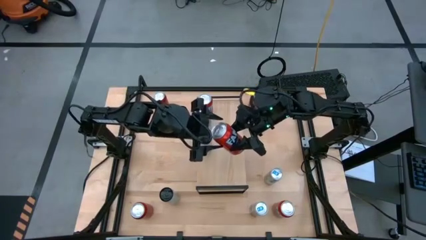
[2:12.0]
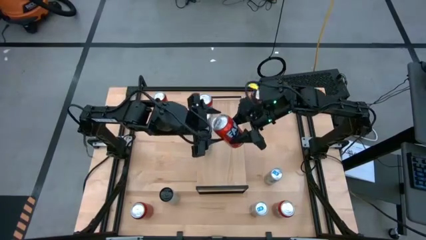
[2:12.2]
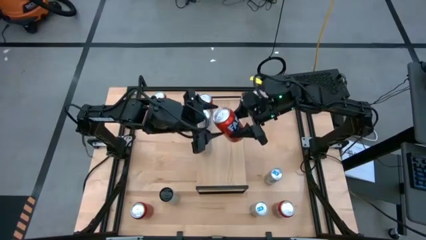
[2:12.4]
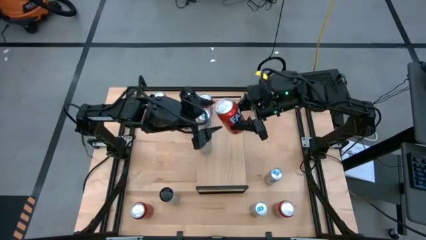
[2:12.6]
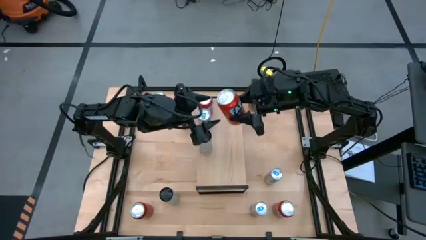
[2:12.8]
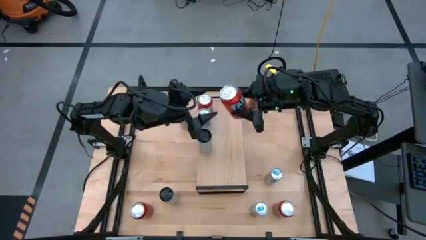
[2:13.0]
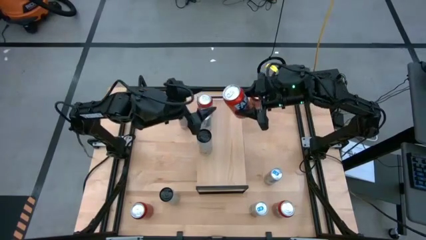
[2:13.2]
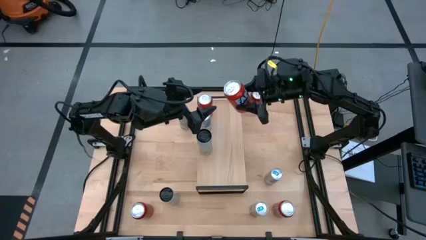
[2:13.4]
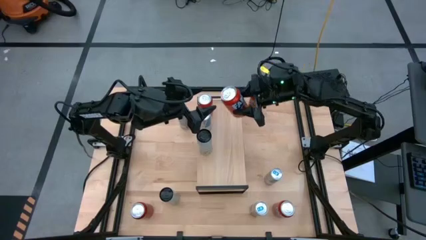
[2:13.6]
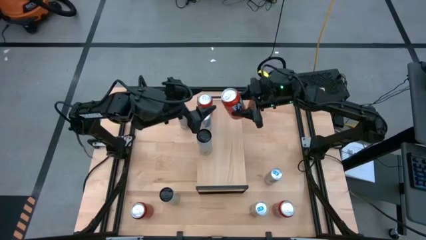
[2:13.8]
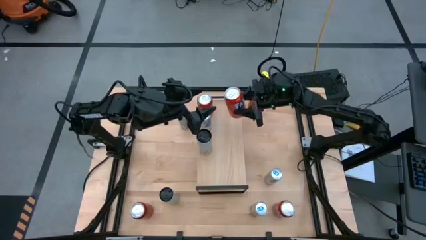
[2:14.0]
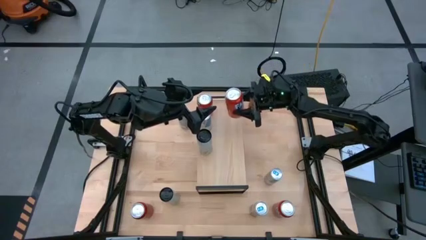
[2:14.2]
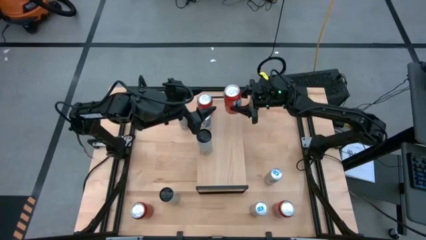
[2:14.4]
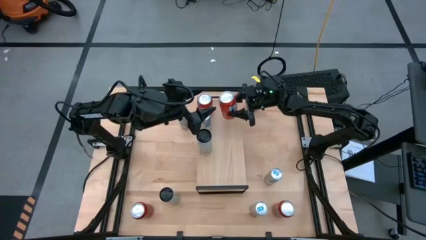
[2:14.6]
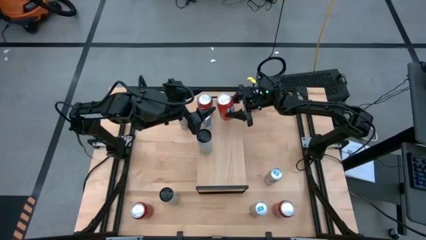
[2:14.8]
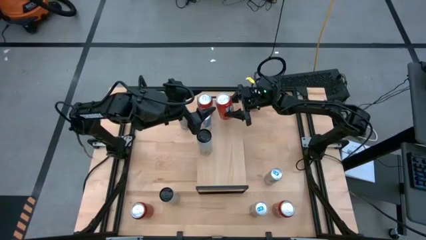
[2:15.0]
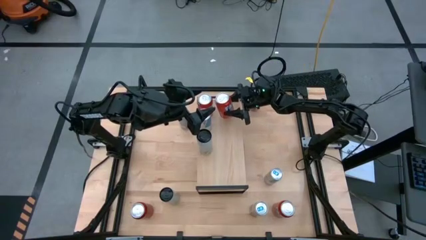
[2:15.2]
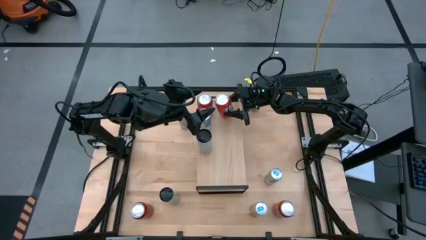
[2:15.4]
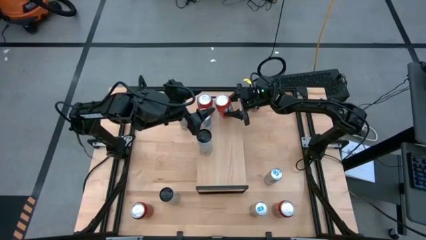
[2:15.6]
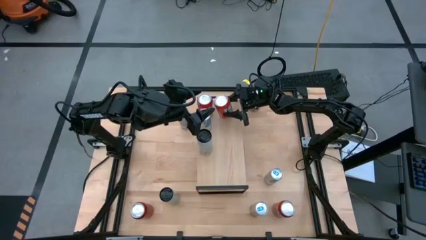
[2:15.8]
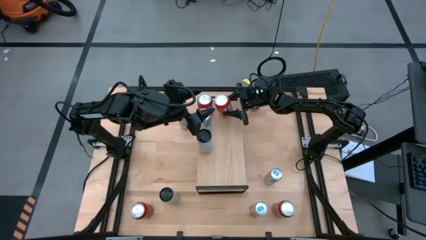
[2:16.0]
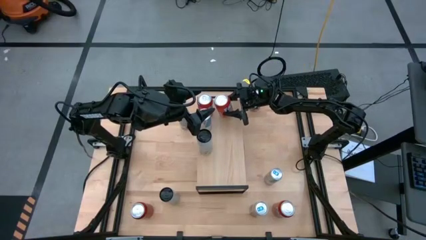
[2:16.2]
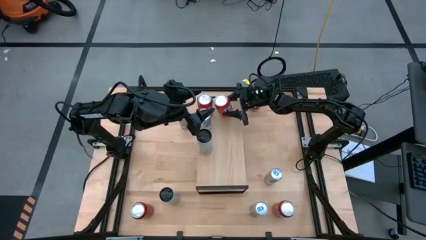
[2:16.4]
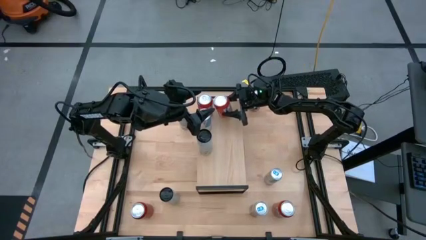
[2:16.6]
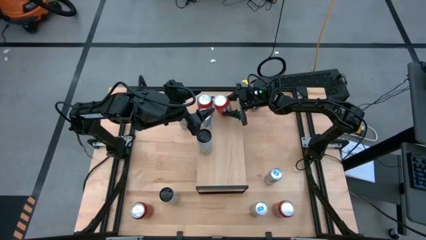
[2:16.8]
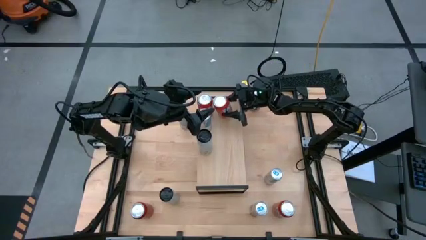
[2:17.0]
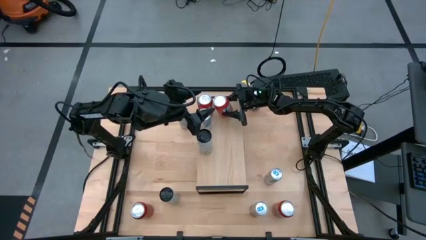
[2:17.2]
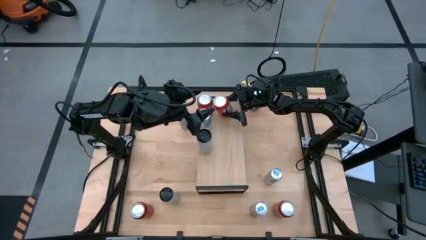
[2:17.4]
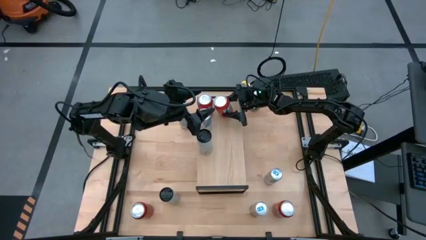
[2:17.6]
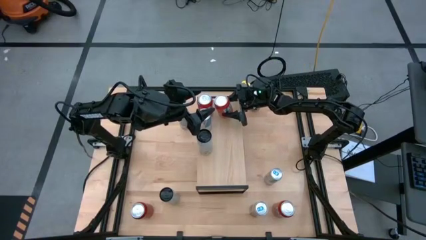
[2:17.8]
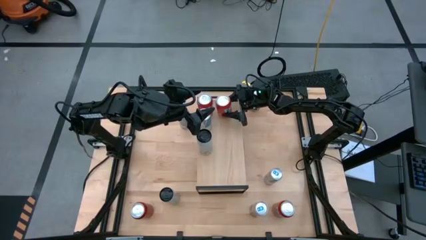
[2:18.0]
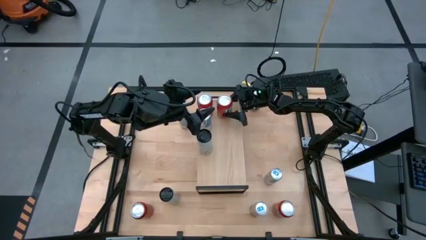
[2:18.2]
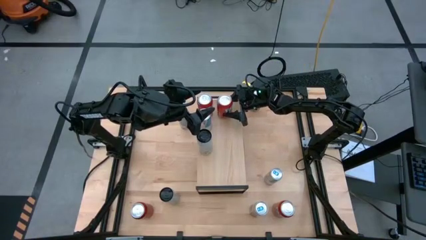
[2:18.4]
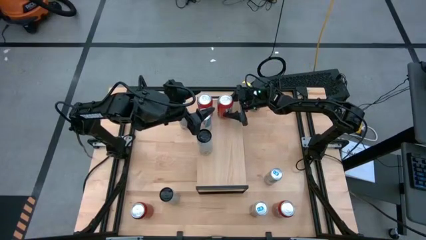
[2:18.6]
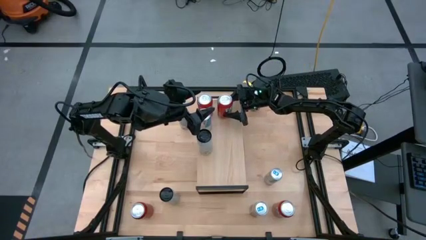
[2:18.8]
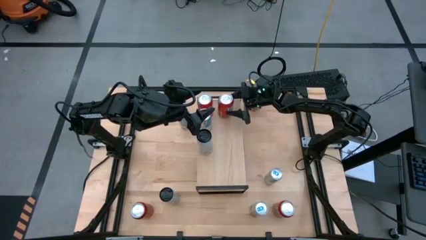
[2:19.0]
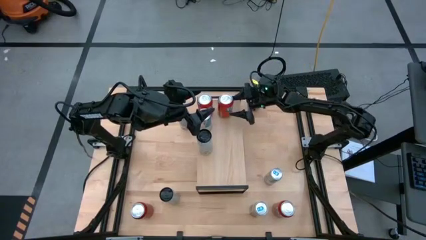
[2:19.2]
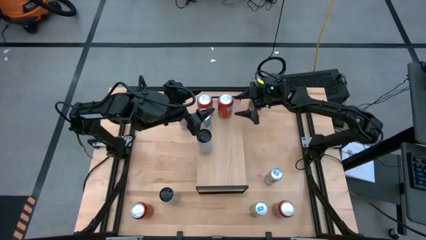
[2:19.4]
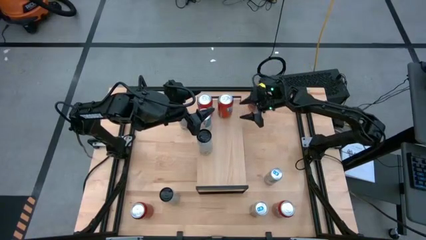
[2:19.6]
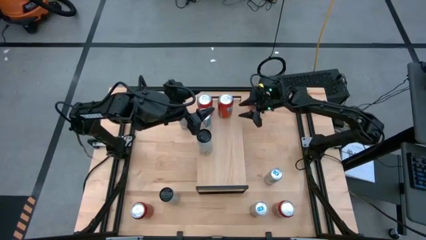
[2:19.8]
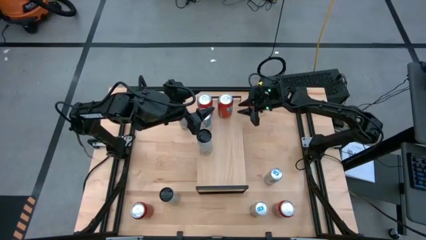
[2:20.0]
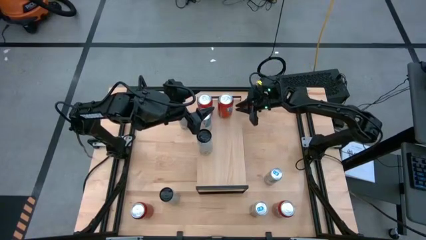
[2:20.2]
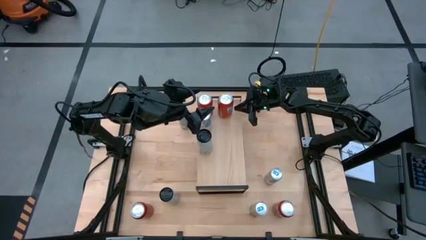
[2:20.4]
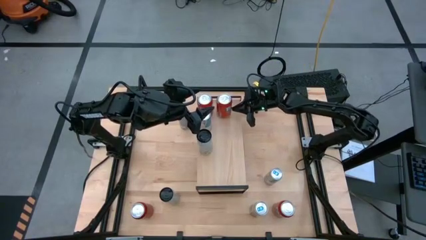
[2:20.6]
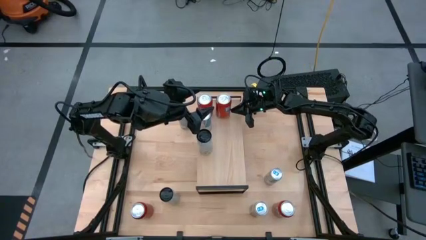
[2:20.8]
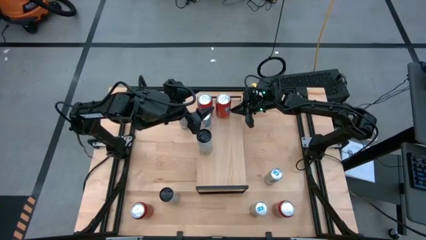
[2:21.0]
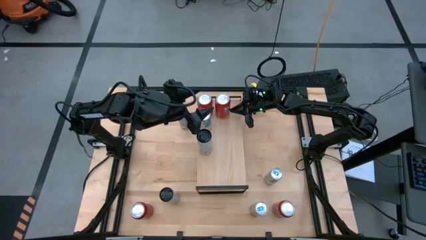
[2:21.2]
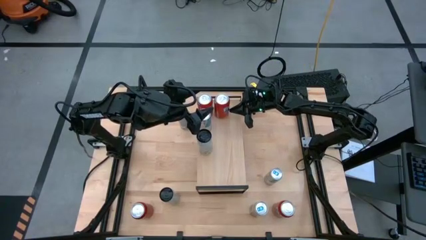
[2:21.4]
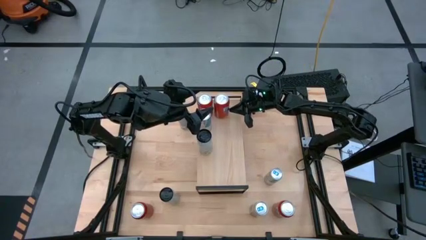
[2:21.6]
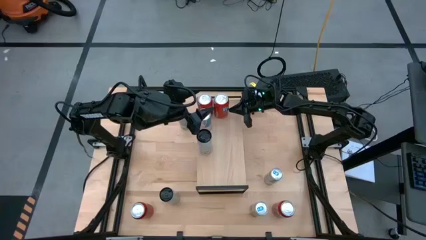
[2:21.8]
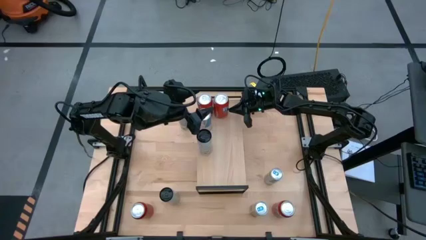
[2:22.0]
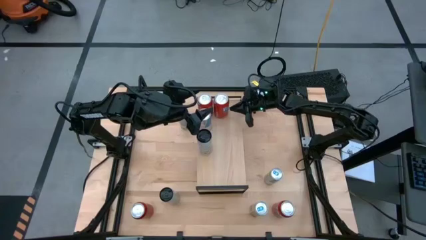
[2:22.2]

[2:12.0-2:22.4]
Task: Place canned beverage on shelf
Put the left orange soda can on the shelf aligned with the other orange soda can
